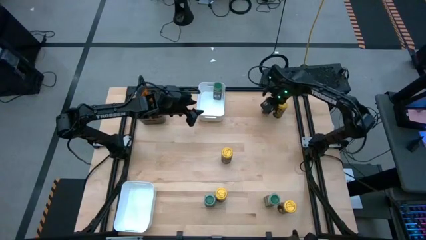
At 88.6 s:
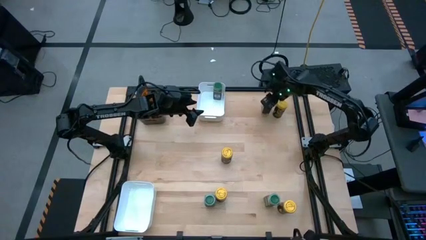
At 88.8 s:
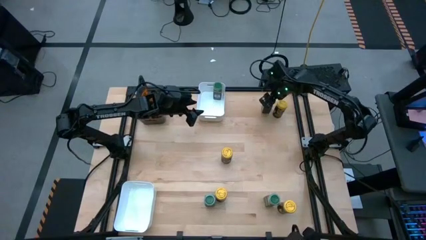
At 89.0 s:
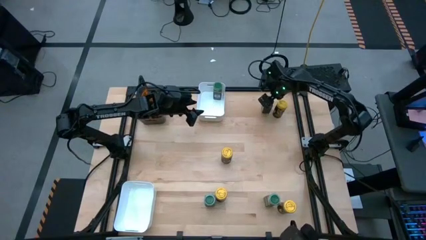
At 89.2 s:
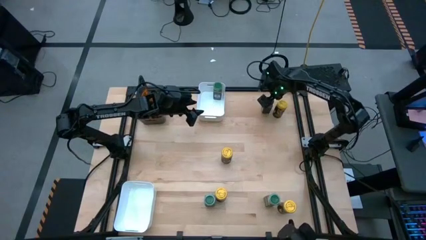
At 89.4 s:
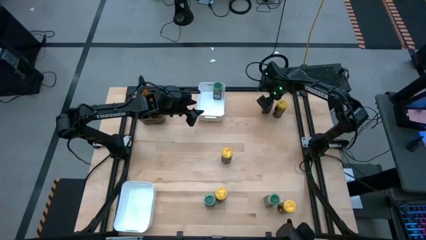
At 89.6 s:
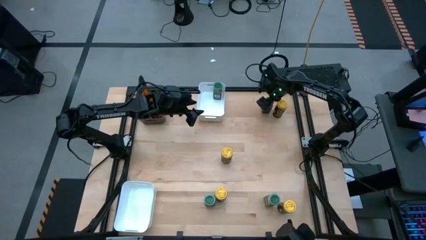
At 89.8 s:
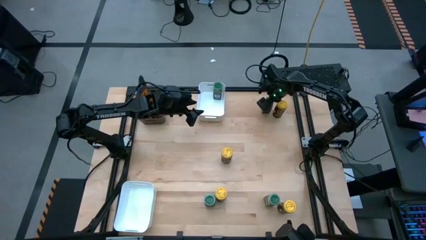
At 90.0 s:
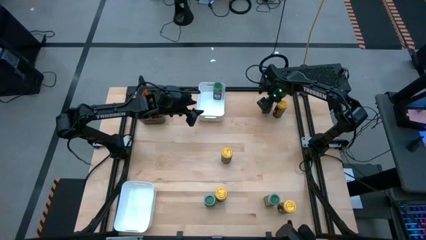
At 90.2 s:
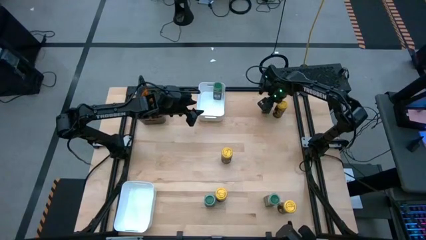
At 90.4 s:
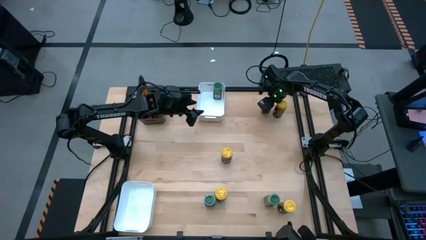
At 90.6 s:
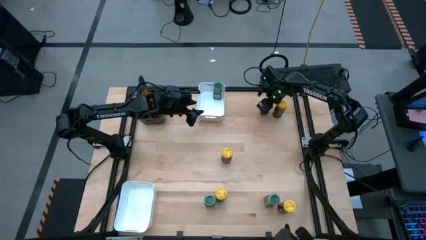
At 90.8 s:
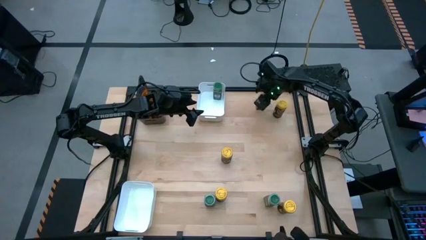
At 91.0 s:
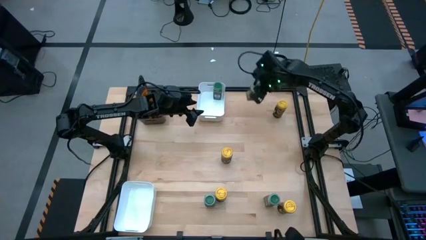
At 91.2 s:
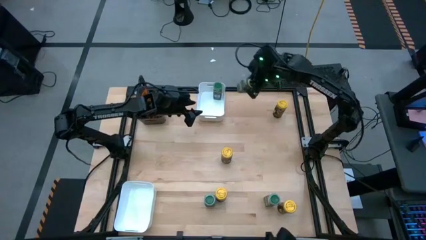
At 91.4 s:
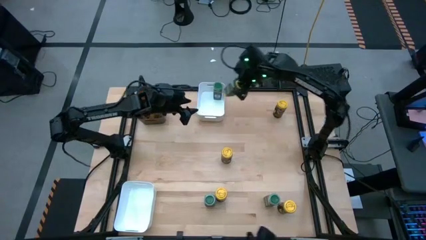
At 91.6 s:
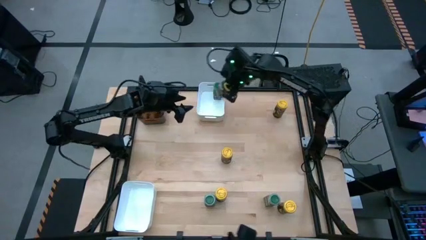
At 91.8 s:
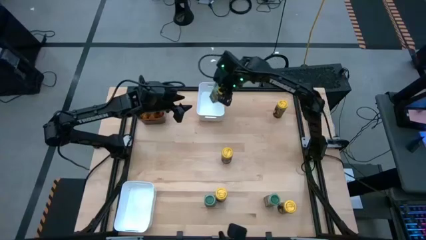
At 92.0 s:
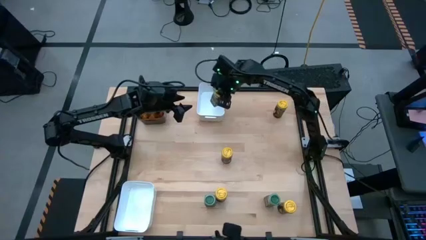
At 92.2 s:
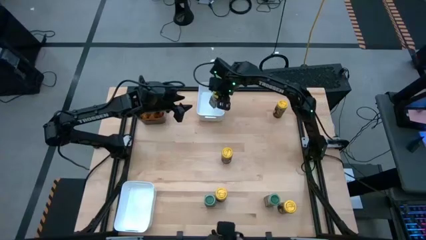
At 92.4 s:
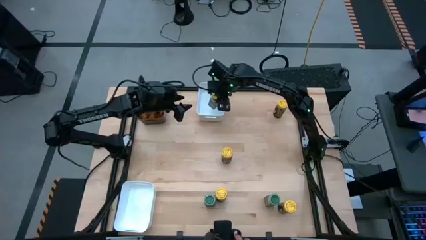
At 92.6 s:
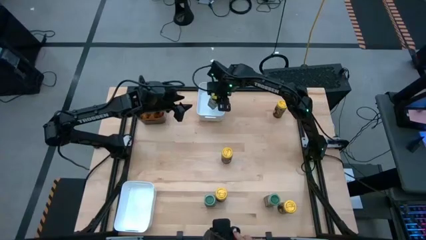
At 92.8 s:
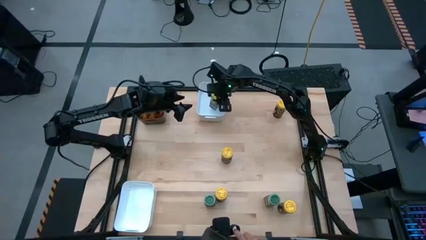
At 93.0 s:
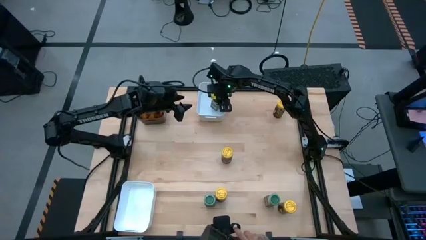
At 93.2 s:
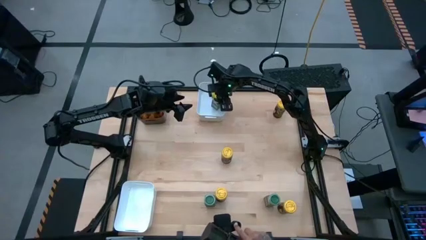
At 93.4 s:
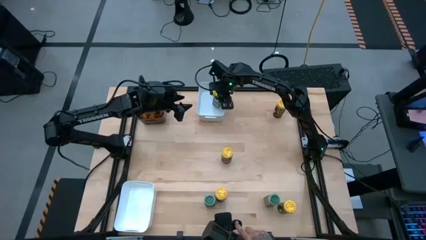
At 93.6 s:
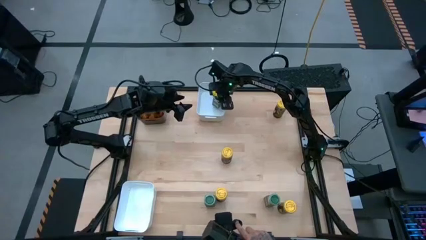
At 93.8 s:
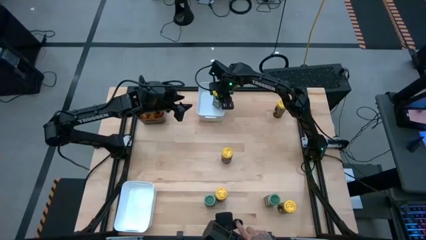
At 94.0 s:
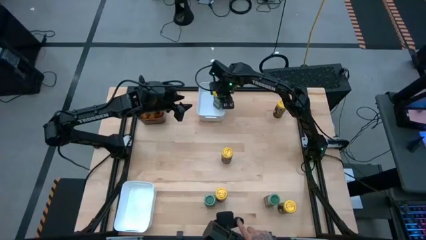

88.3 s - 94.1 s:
Task: Sort spices by type
Put the top green seasoning bottle into the top white bin

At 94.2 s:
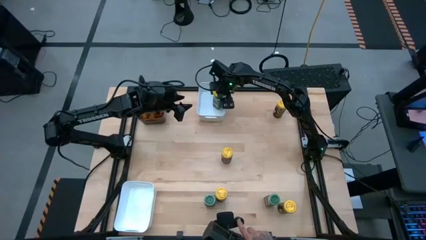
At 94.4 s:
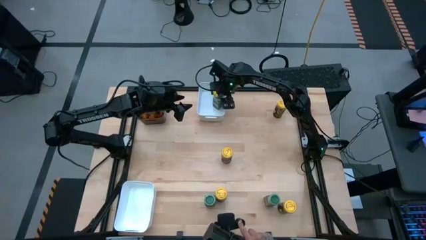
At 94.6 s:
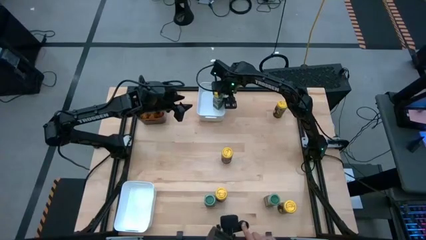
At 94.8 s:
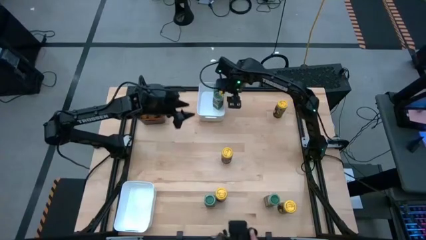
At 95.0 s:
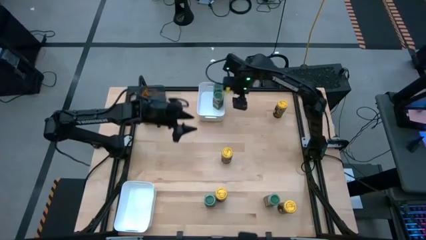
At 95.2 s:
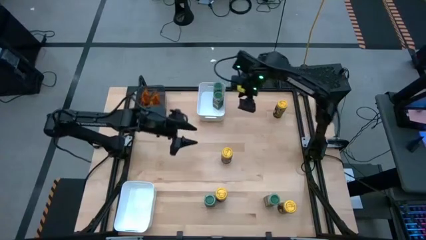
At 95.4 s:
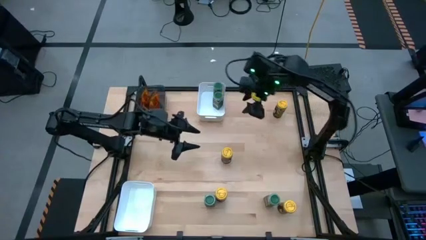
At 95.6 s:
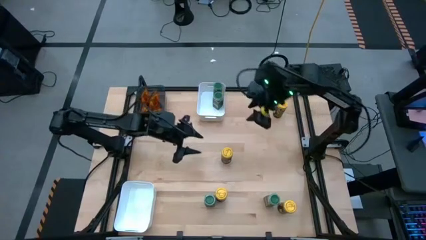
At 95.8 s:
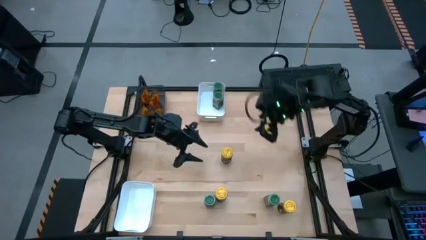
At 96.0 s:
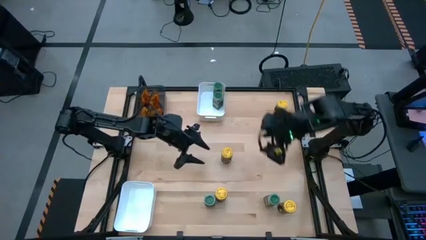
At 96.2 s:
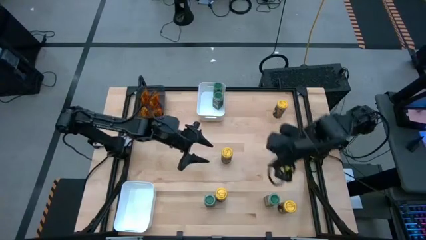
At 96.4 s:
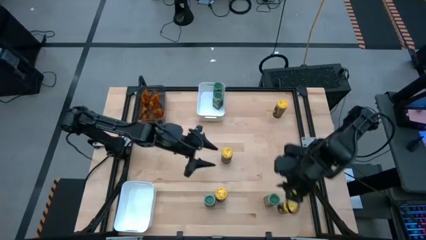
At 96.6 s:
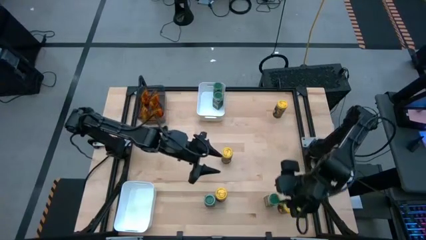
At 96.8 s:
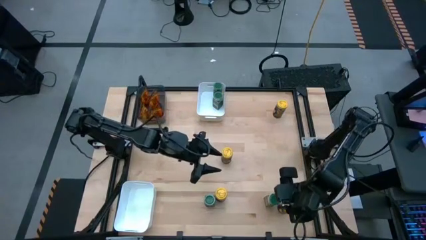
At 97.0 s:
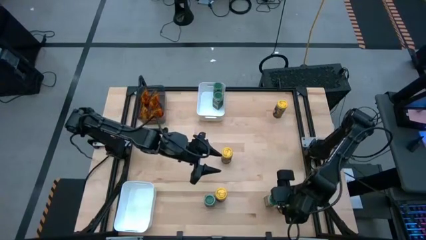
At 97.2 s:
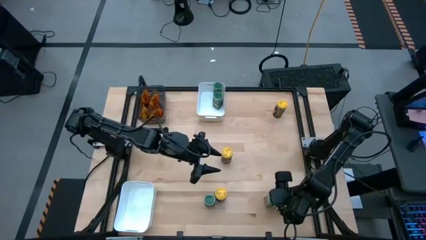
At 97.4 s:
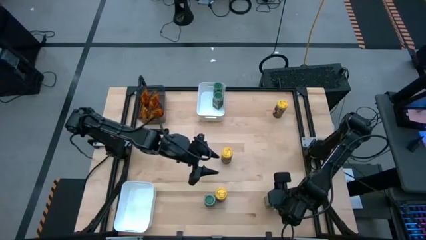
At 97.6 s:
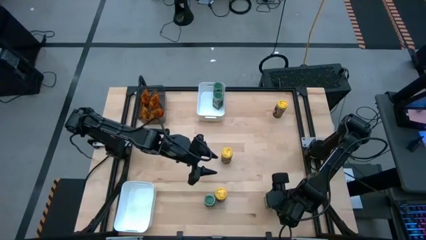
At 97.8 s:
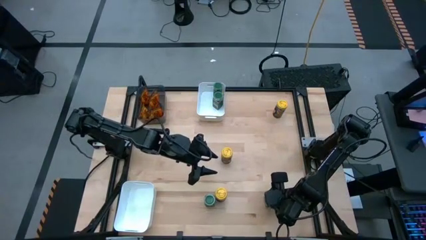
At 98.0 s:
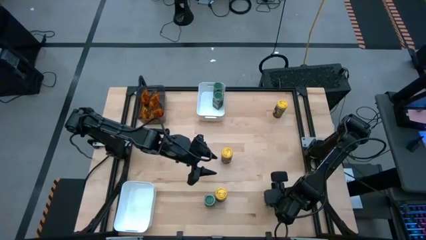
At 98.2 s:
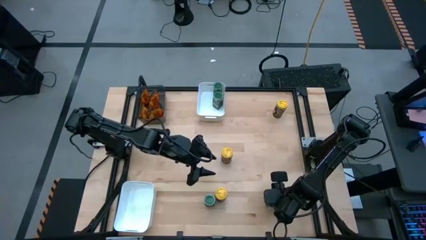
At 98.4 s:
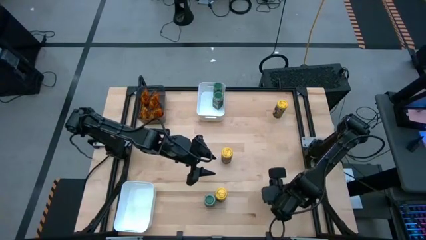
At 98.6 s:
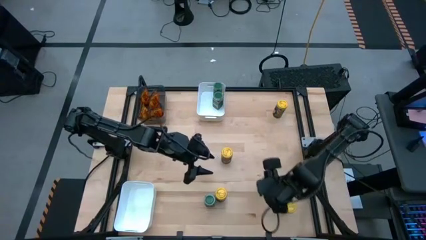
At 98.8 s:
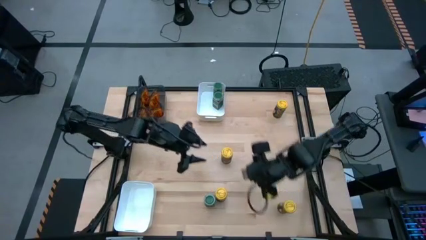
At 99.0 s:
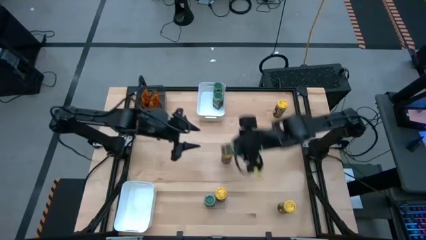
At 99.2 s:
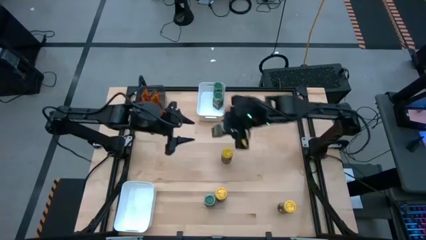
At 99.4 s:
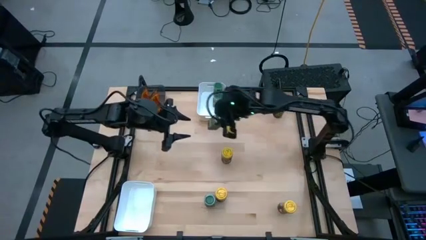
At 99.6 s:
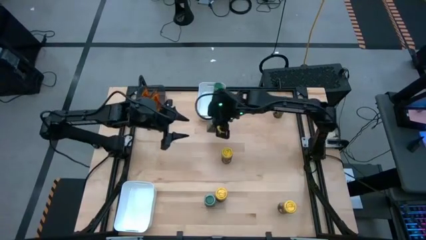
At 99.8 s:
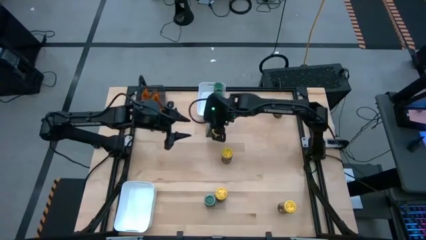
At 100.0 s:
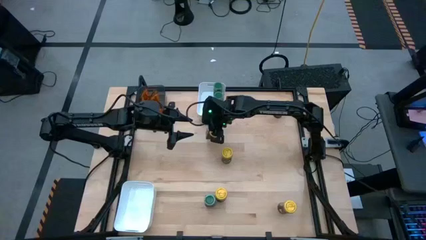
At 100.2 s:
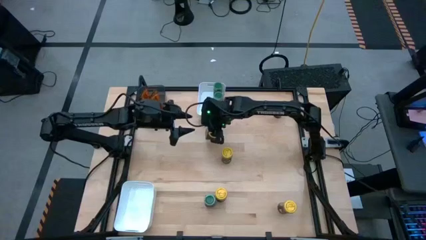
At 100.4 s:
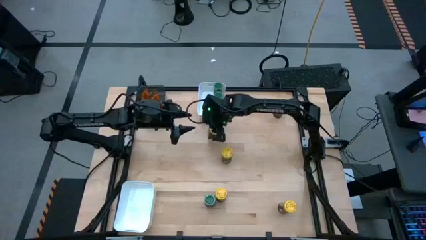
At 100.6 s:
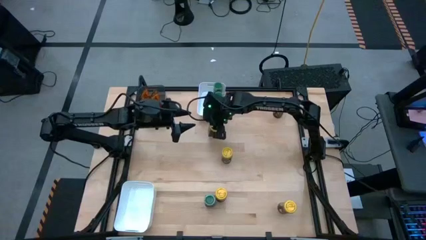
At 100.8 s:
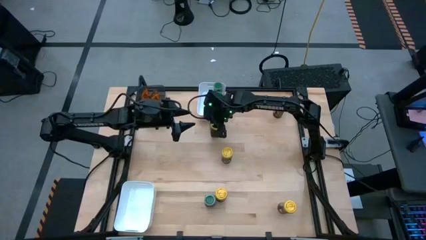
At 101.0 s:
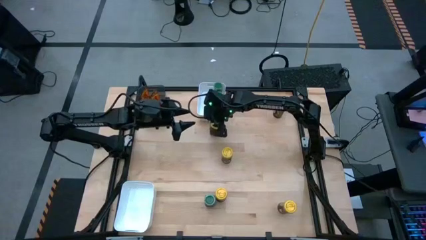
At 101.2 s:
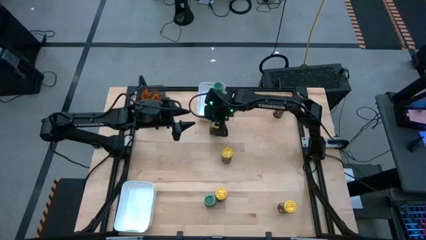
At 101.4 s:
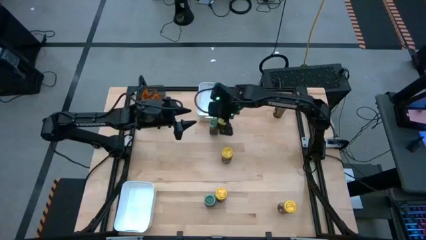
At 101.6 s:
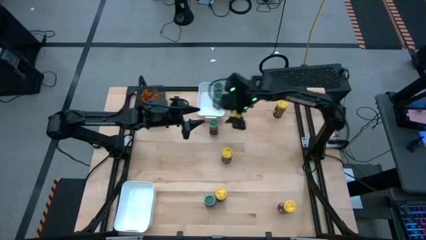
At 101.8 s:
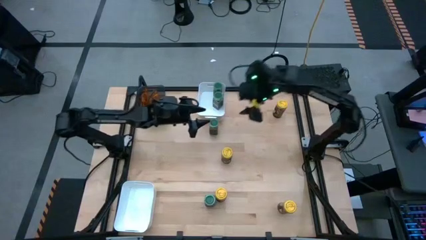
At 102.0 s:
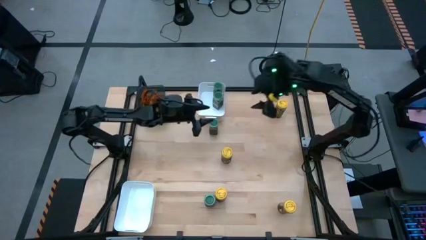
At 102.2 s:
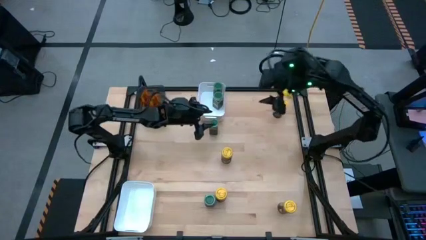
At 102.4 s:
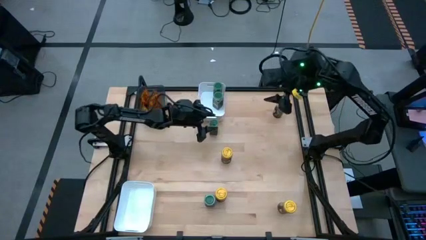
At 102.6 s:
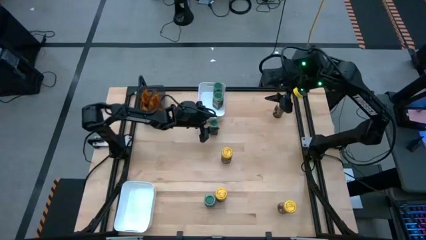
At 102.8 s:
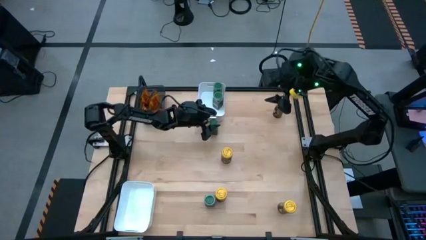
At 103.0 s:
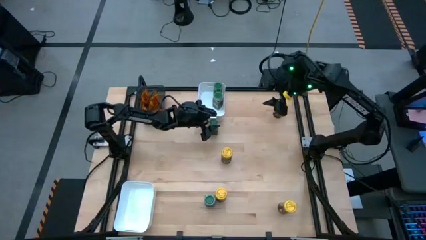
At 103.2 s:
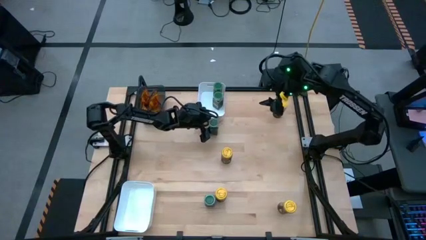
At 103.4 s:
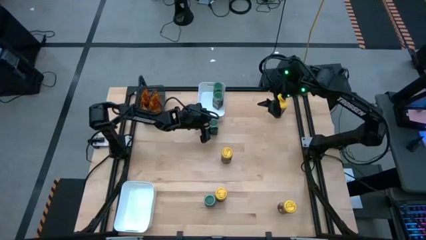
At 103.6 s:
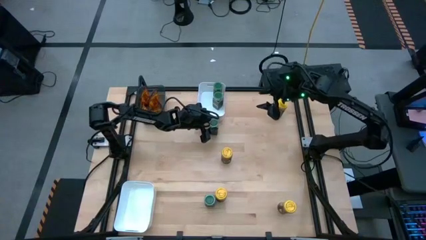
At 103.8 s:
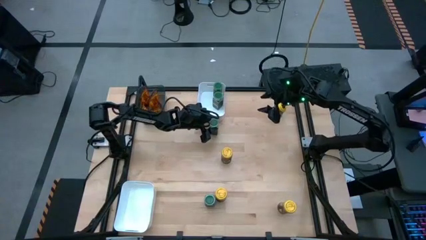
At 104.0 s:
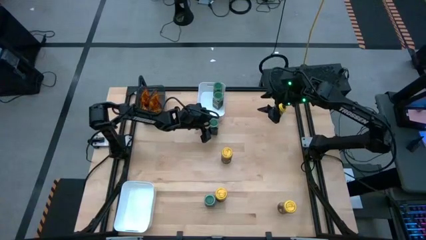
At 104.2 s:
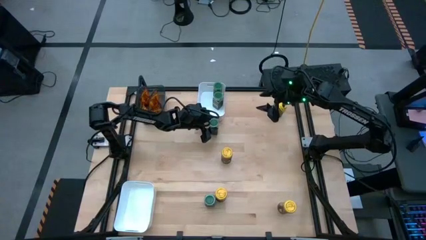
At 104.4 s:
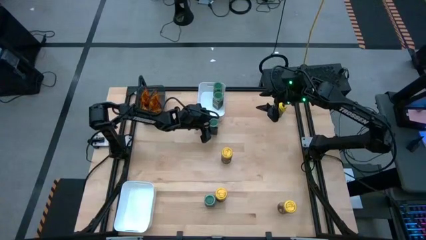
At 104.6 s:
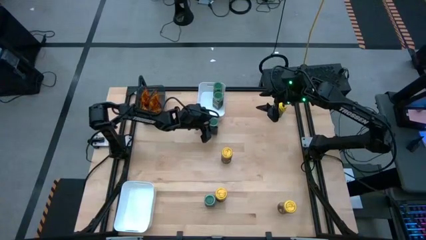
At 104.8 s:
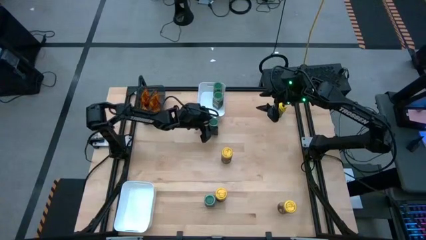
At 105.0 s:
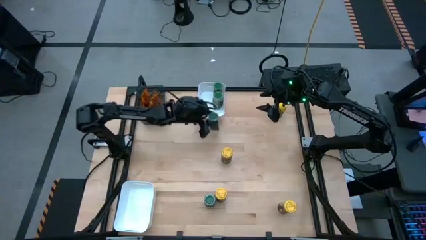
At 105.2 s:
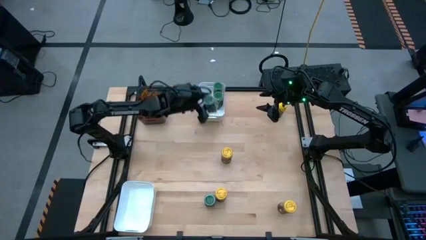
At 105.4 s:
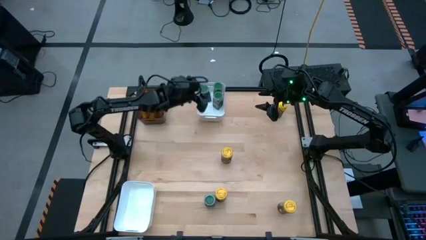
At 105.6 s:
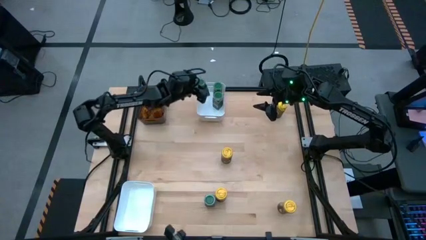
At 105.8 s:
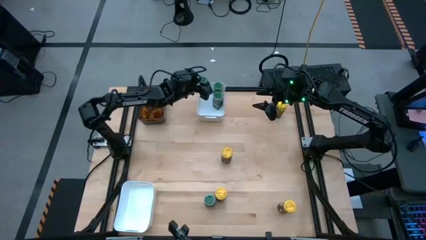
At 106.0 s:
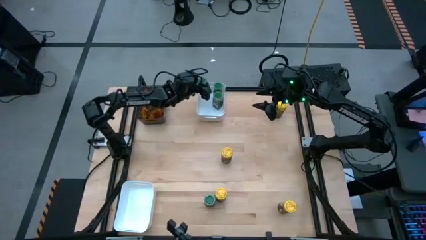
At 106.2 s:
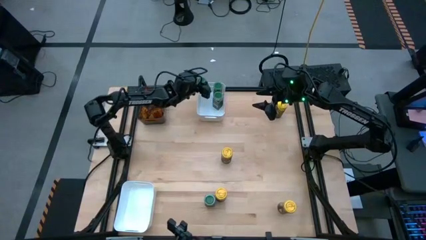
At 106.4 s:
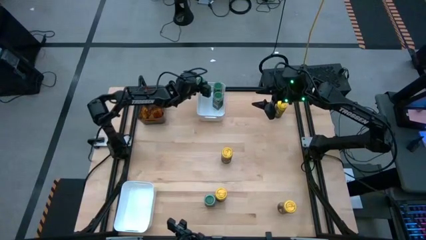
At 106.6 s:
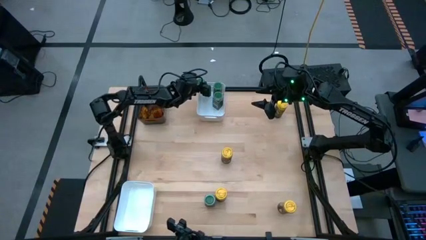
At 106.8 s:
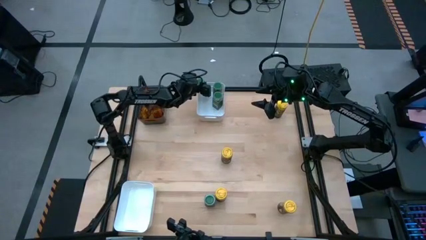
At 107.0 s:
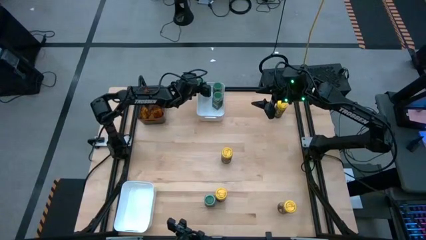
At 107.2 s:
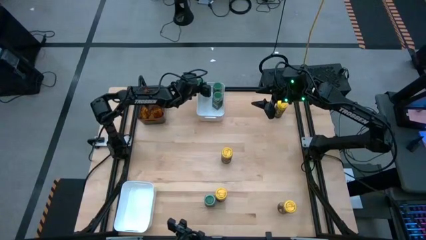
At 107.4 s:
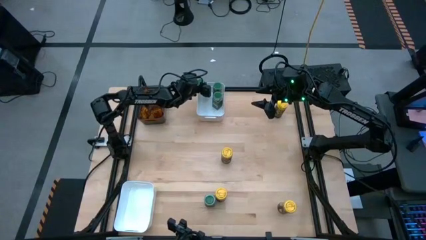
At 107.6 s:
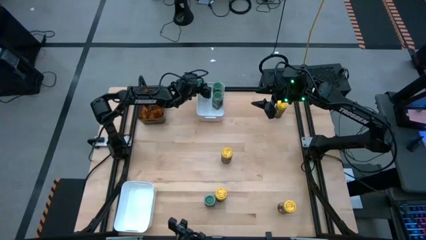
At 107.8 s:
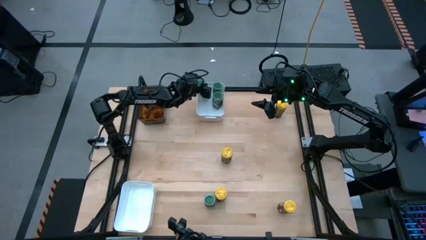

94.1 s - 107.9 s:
Put the right green seasoning bottle into the top white bin
